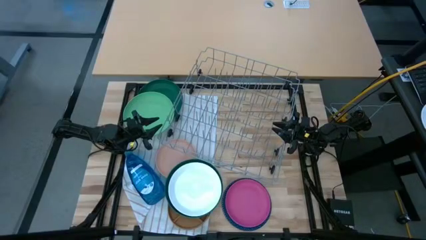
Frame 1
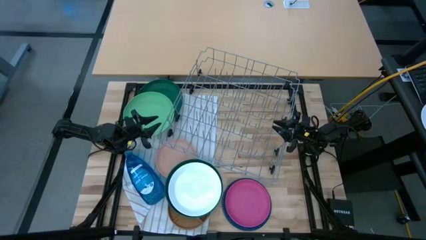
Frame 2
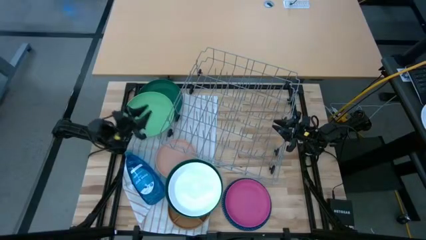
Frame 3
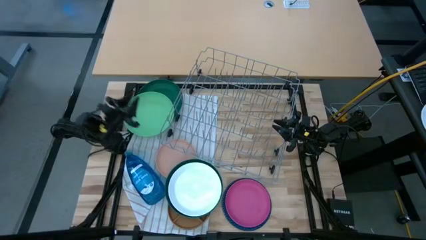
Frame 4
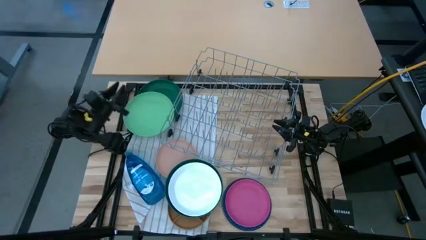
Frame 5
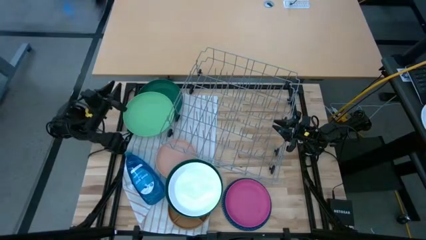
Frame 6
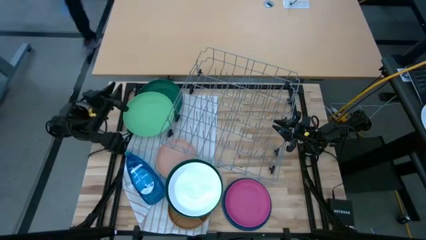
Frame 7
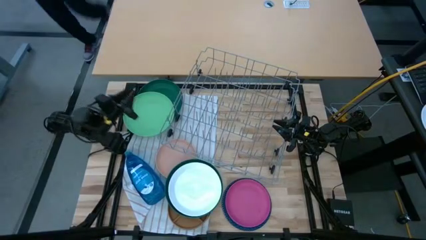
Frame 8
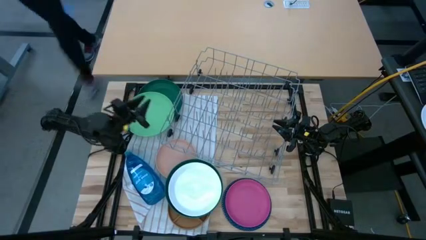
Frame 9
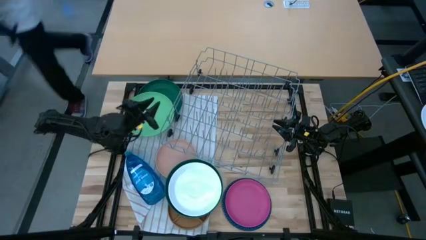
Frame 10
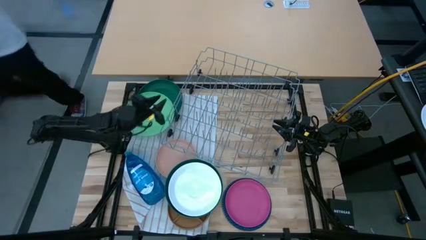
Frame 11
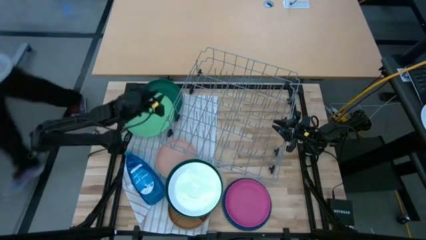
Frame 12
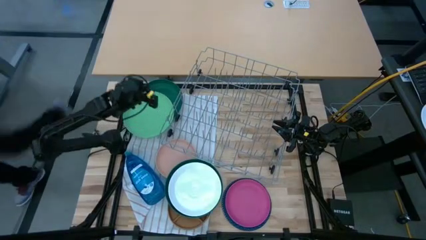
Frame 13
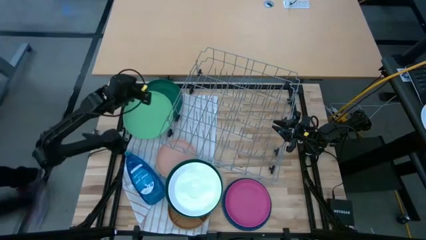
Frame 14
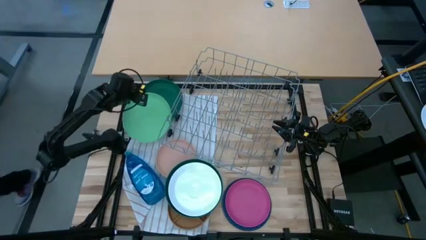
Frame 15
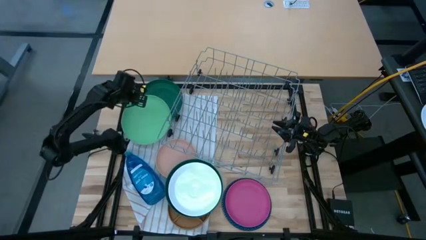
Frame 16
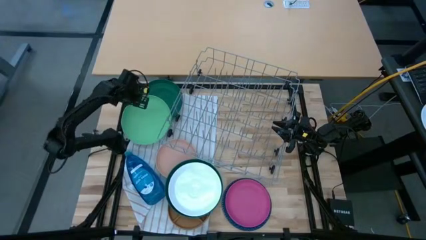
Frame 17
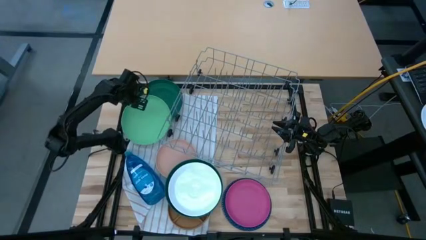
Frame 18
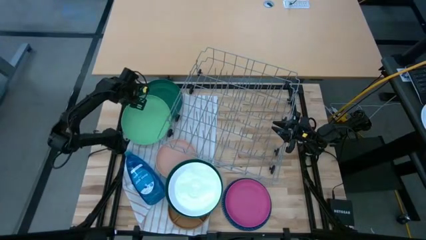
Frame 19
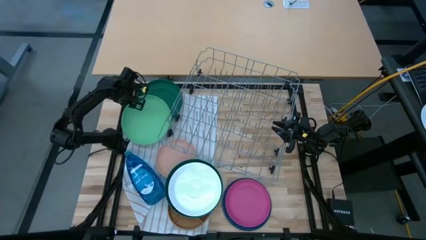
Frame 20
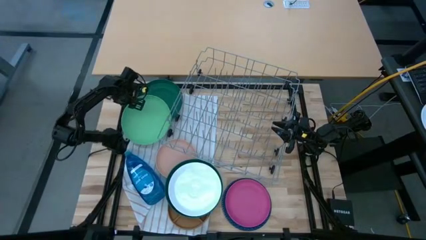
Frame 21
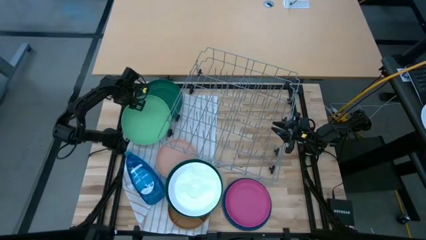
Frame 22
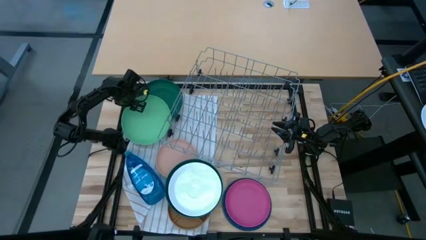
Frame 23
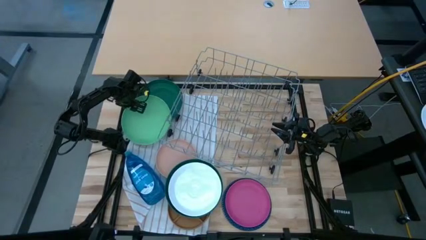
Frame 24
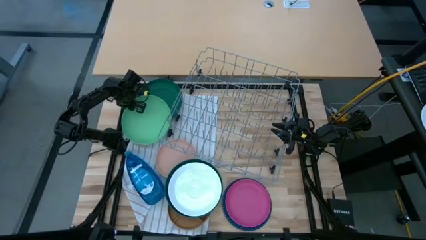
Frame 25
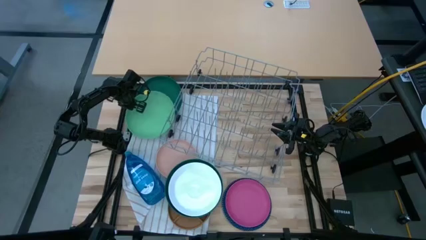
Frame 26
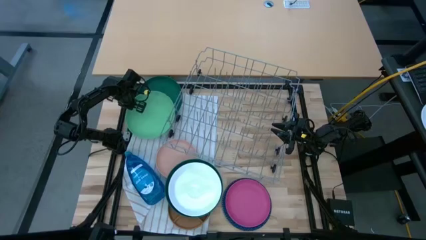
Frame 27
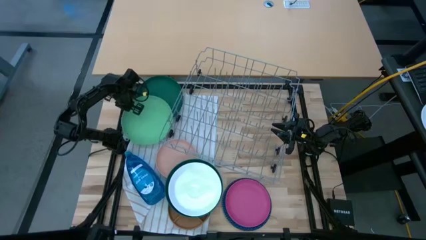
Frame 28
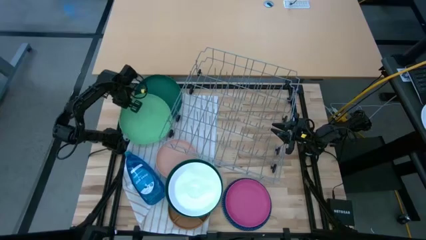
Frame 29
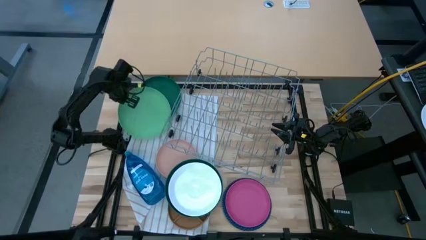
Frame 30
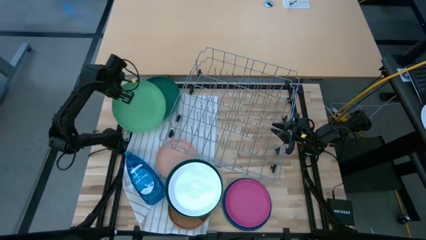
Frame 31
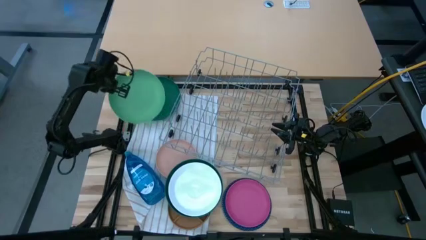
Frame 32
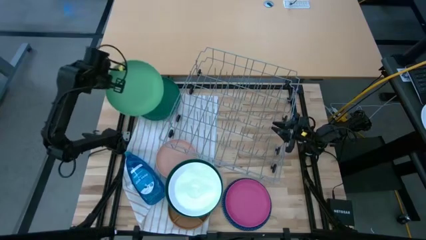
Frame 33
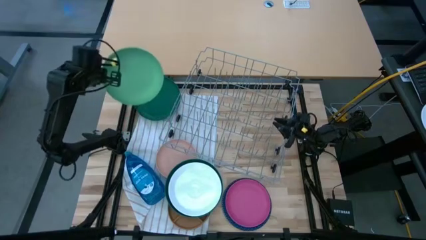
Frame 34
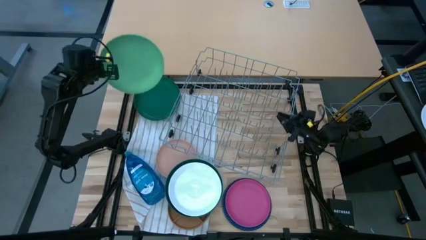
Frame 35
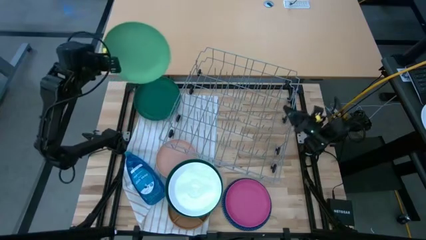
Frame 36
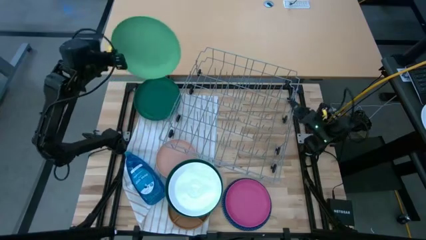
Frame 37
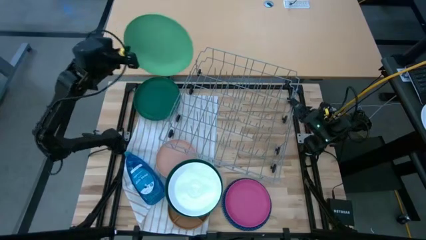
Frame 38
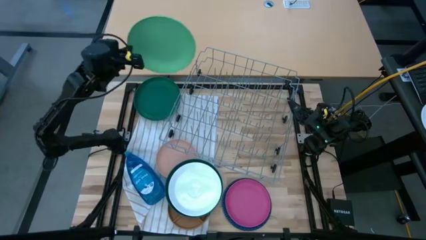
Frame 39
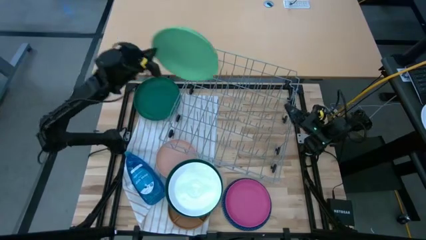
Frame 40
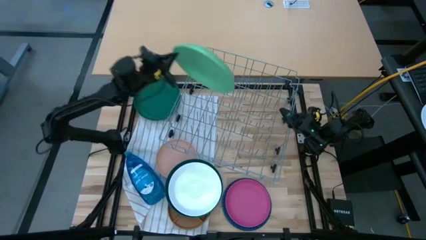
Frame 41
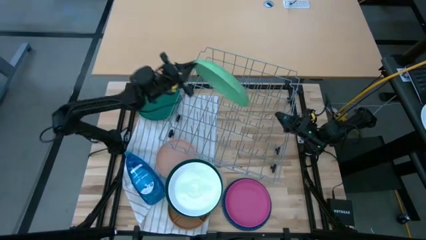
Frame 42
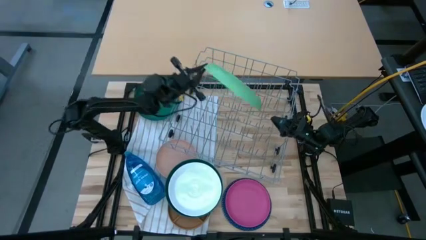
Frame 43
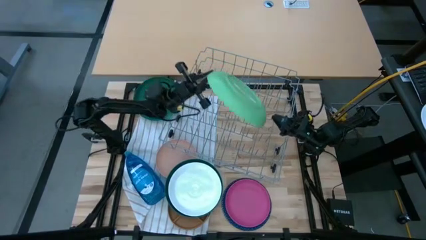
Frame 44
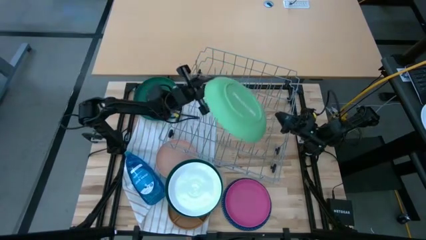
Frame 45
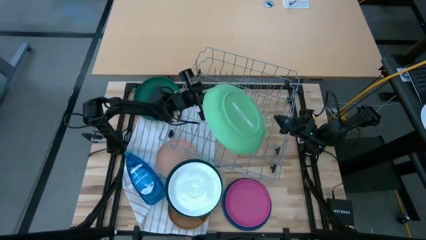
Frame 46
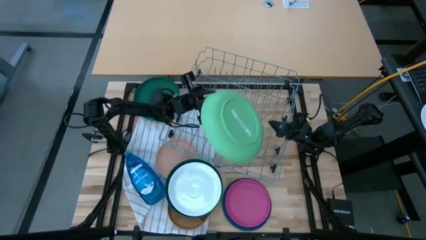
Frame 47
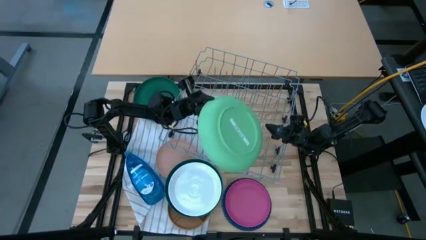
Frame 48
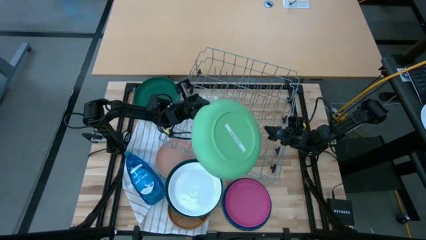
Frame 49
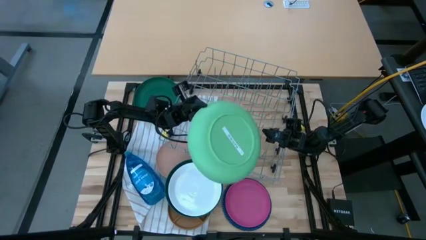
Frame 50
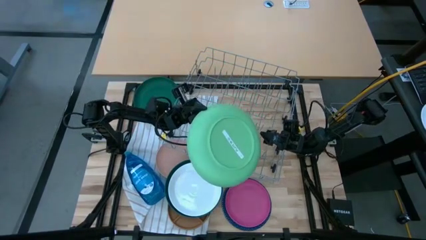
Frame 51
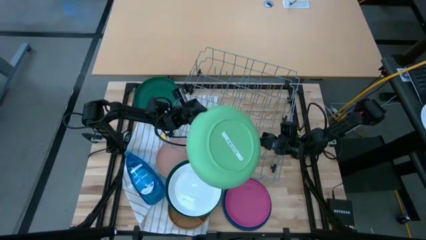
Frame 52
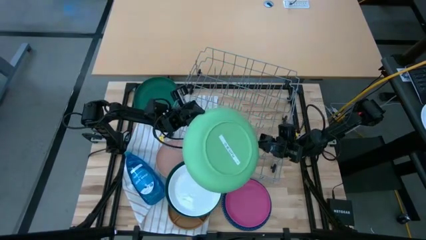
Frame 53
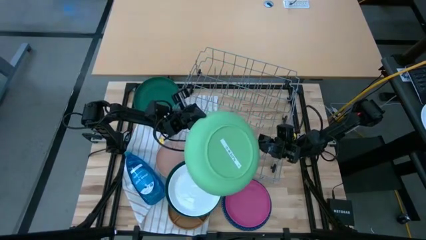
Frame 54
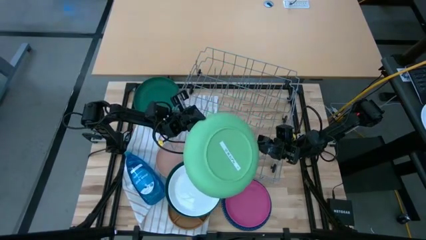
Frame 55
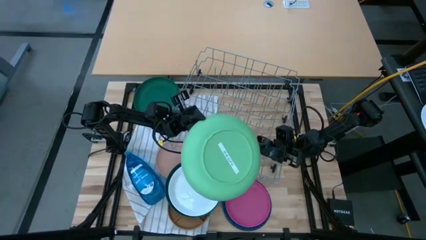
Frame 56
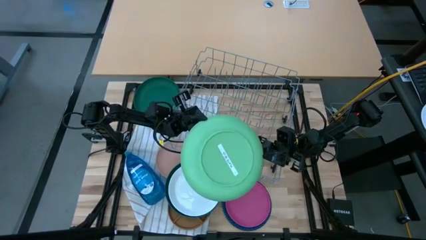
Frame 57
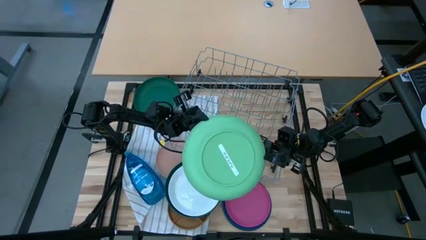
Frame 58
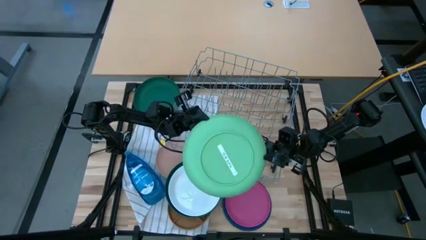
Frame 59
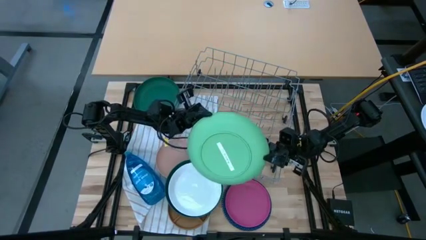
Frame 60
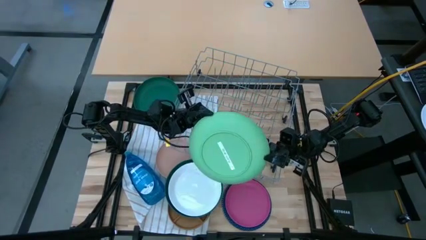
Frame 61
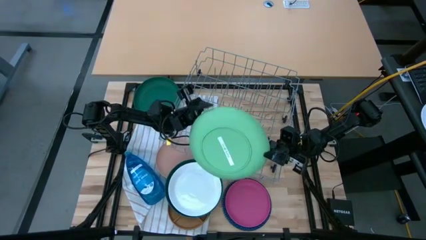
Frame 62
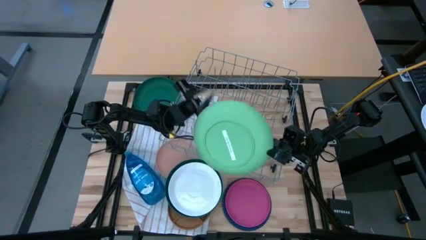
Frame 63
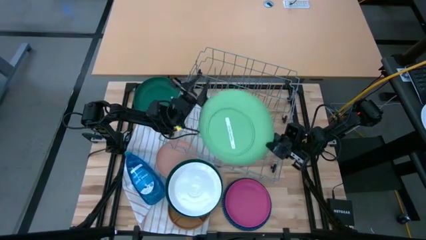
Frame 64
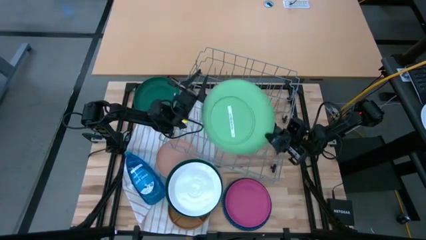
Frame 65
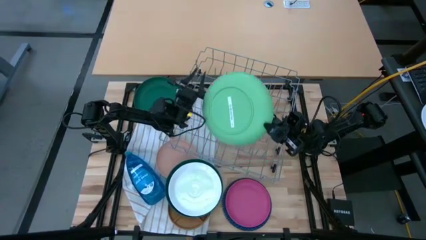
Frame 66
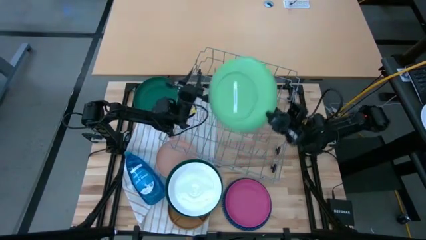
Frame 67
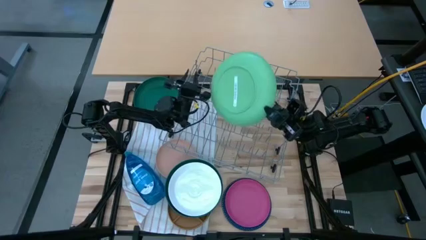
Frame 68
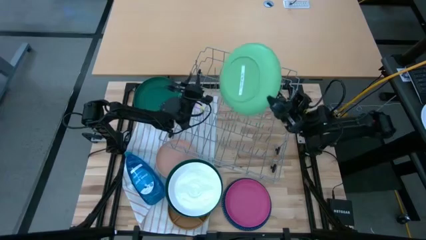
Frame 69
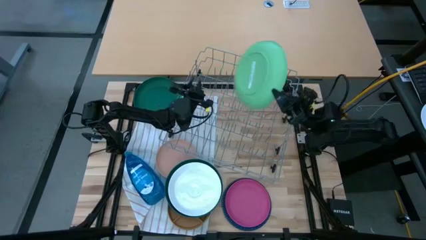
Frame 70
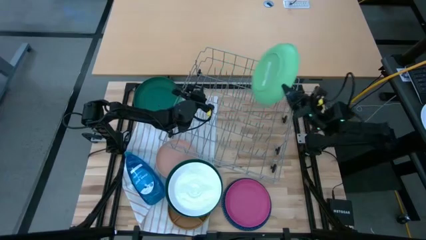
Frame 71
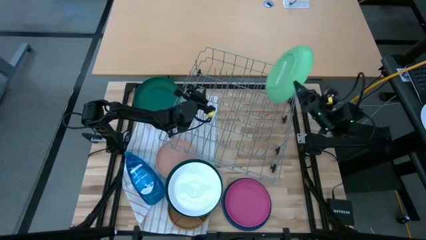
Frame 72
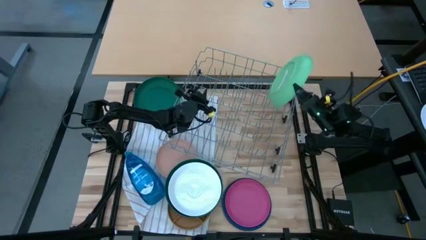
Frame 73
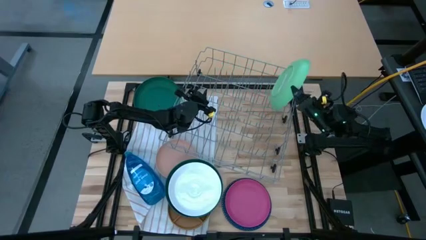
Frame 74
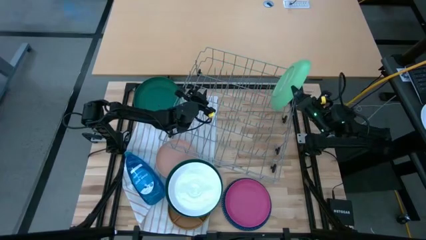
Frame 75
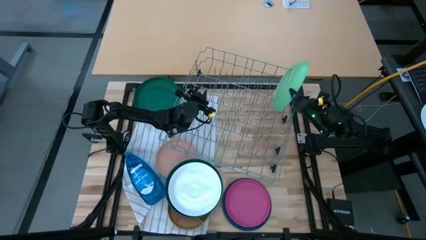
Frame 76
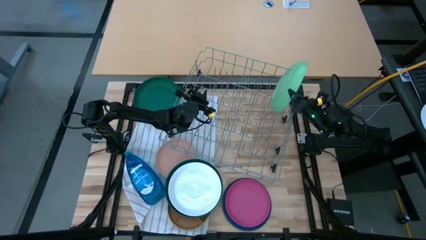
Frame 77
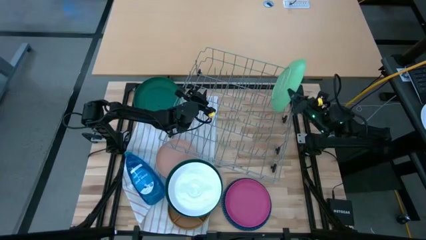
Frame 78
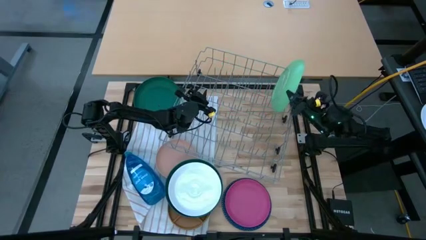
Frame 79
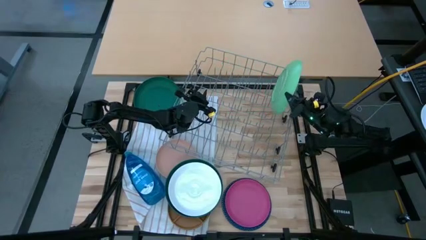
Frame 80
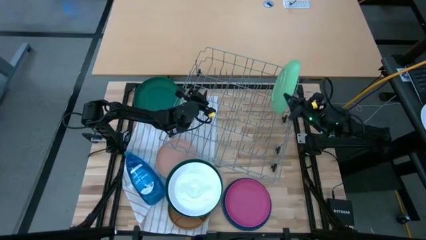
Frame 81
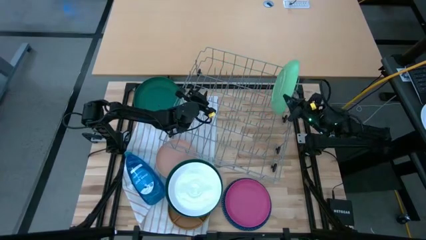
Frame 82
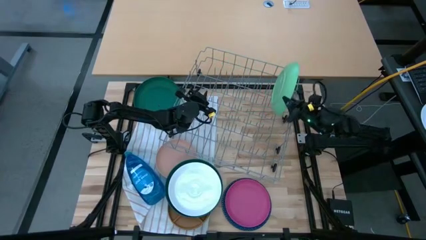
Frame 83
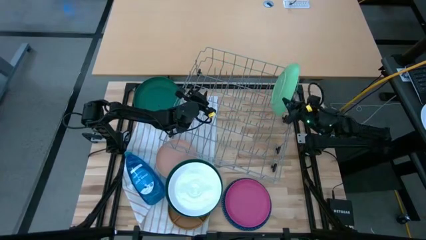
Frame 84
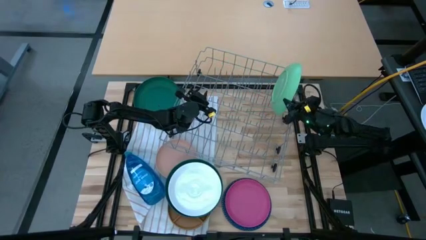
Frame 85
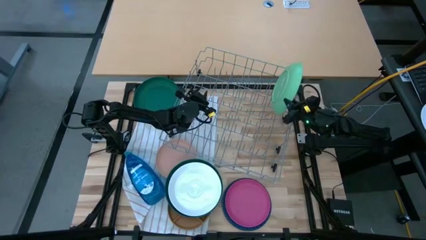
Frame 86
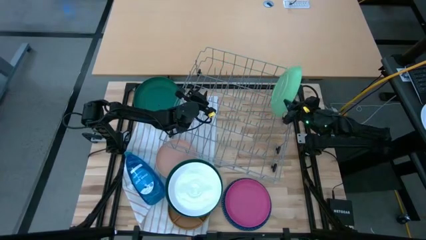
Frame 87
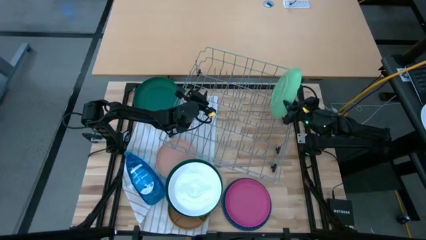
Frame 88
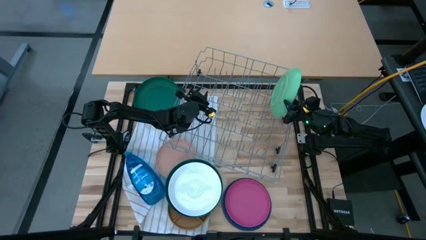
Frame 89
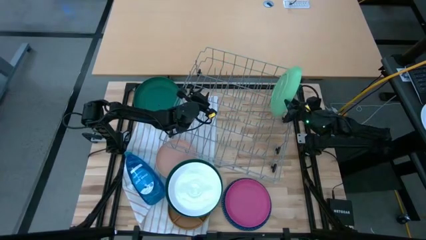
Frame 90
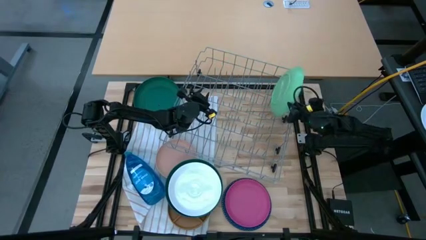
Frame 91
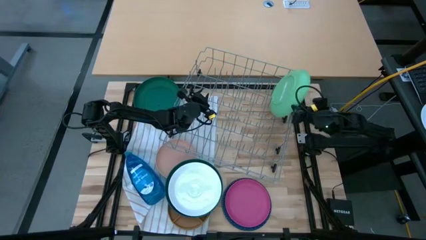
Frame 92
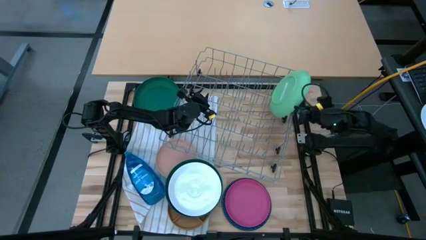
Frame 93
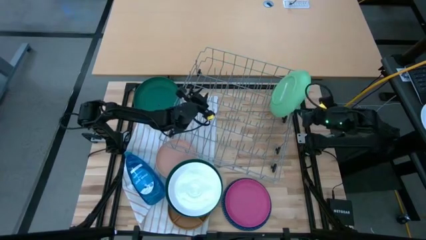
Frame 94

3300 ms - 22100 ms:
Task: Sort dishes
Put the green plate in the dish rack
